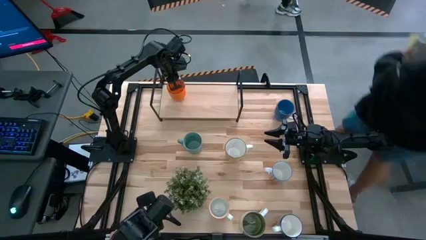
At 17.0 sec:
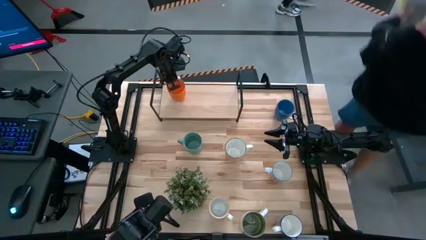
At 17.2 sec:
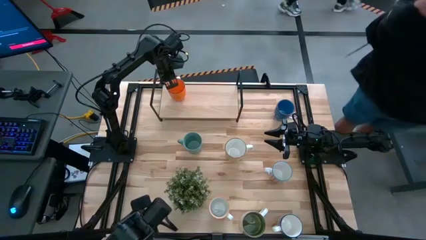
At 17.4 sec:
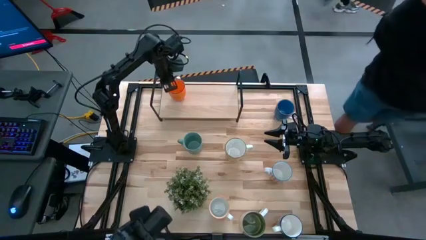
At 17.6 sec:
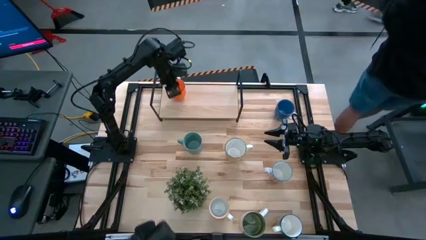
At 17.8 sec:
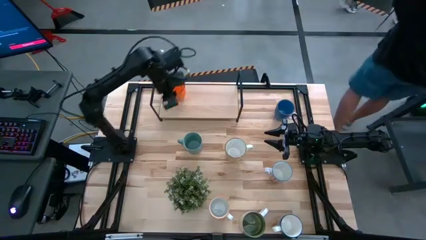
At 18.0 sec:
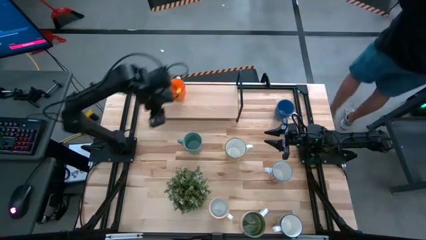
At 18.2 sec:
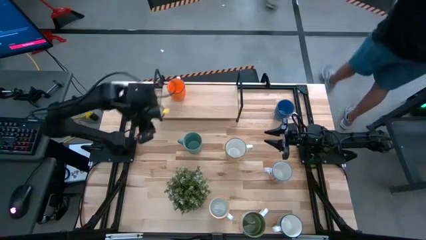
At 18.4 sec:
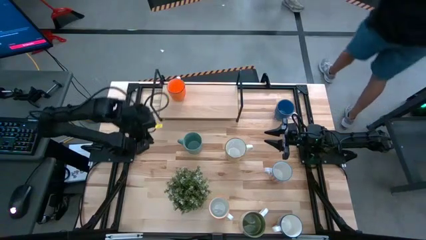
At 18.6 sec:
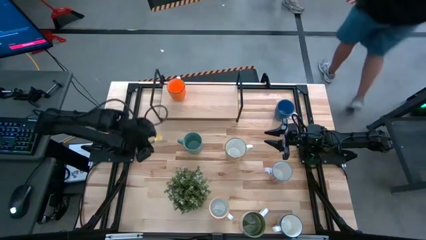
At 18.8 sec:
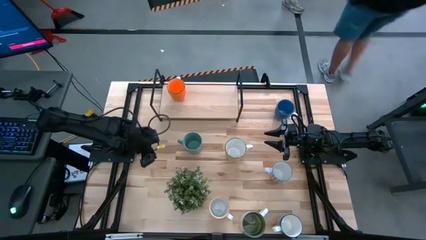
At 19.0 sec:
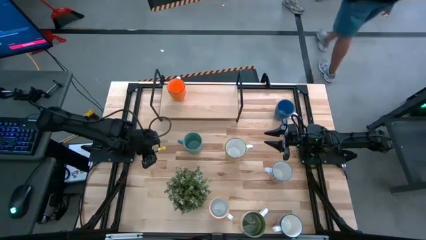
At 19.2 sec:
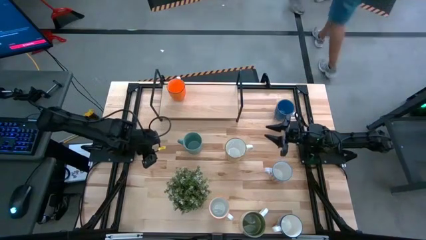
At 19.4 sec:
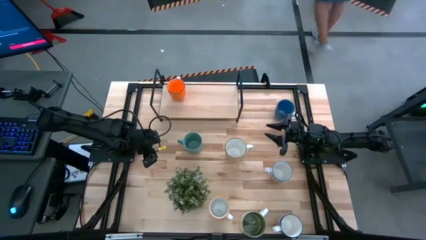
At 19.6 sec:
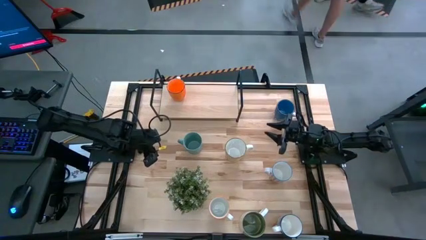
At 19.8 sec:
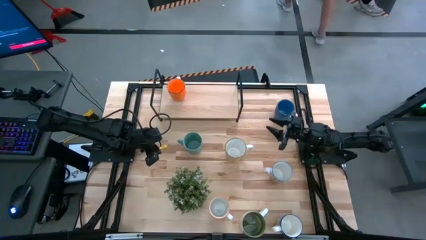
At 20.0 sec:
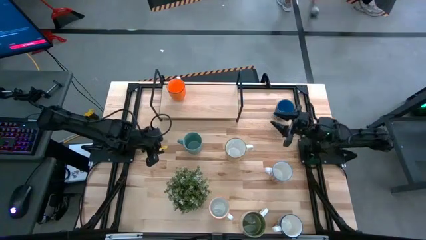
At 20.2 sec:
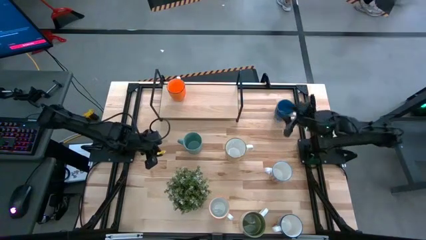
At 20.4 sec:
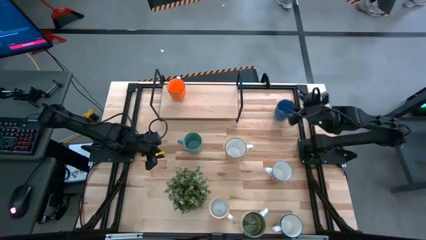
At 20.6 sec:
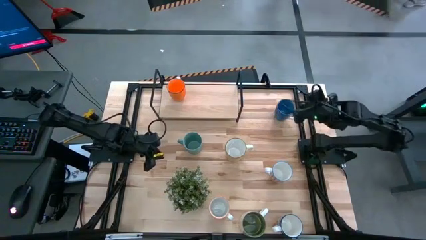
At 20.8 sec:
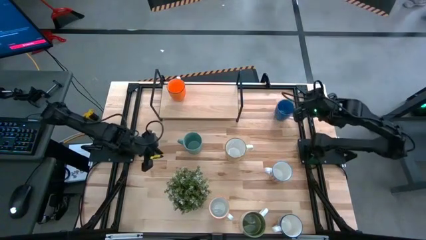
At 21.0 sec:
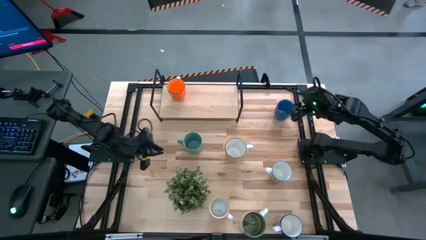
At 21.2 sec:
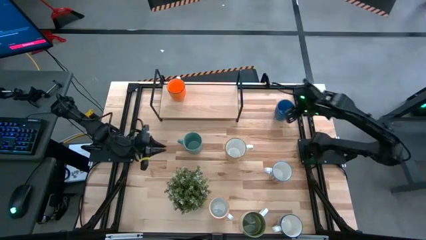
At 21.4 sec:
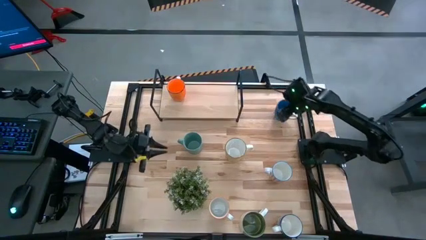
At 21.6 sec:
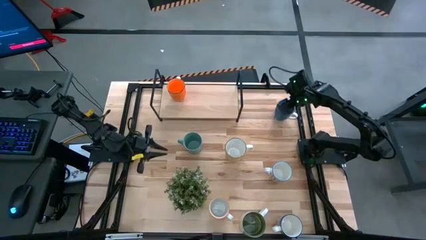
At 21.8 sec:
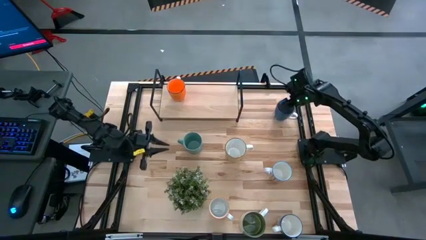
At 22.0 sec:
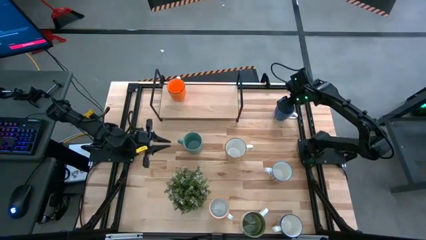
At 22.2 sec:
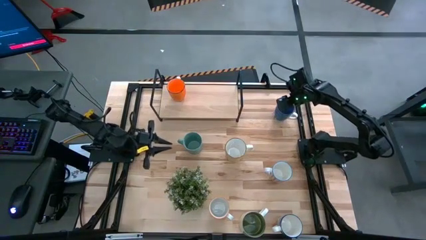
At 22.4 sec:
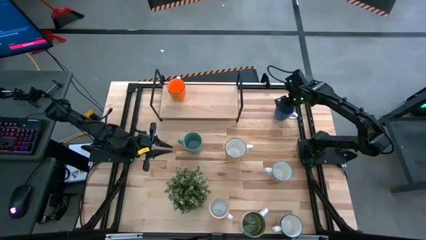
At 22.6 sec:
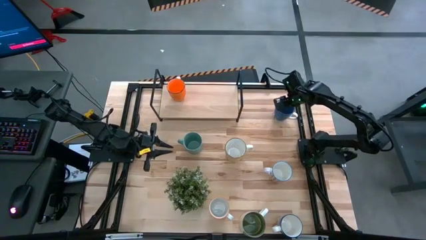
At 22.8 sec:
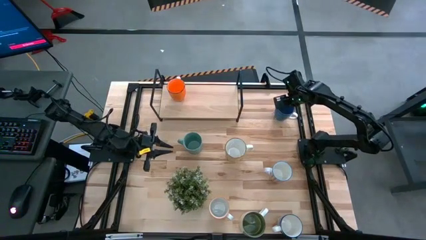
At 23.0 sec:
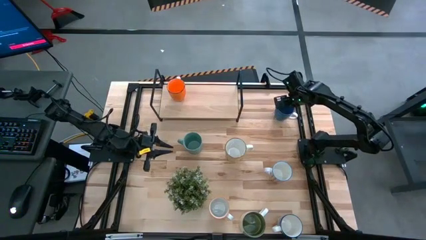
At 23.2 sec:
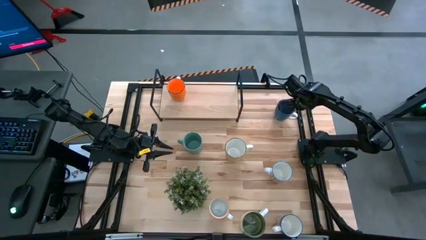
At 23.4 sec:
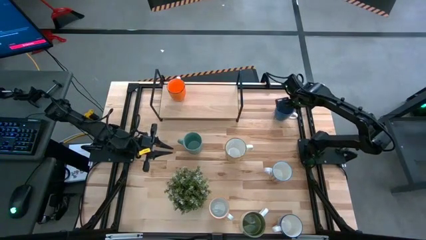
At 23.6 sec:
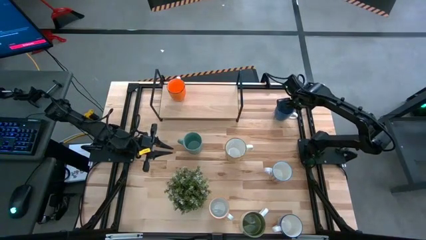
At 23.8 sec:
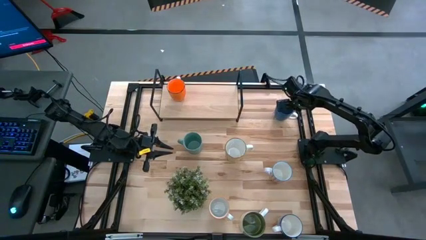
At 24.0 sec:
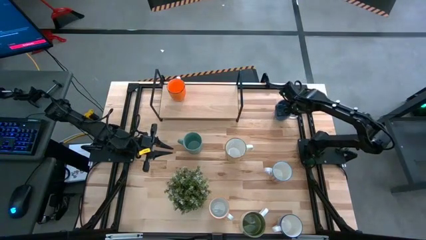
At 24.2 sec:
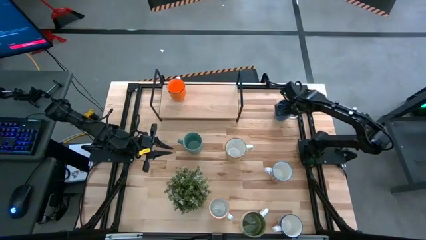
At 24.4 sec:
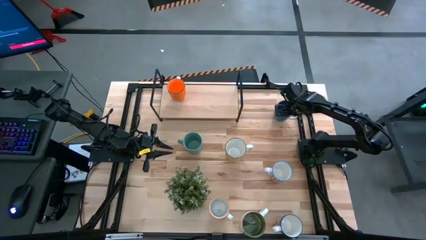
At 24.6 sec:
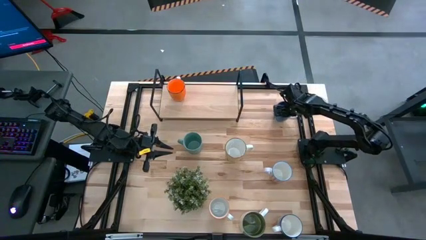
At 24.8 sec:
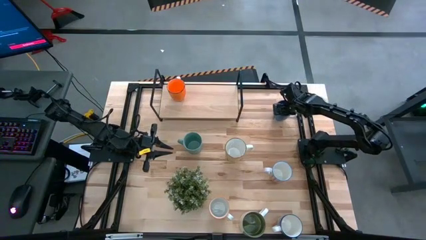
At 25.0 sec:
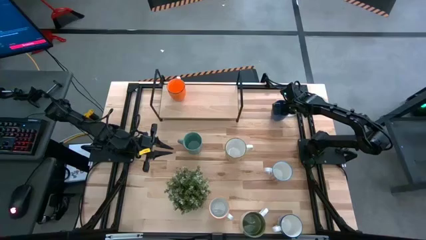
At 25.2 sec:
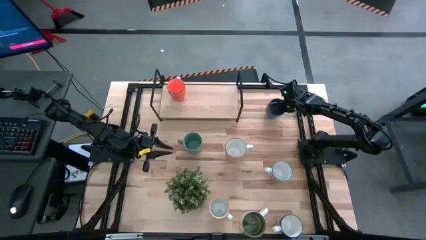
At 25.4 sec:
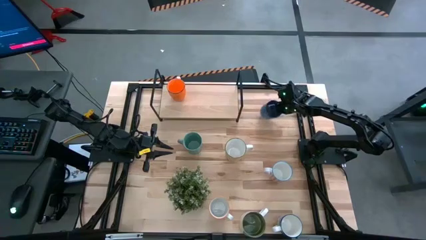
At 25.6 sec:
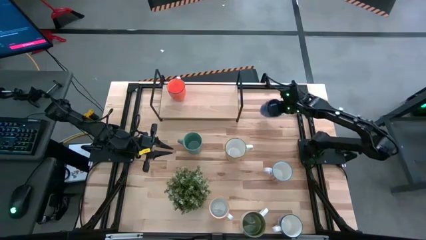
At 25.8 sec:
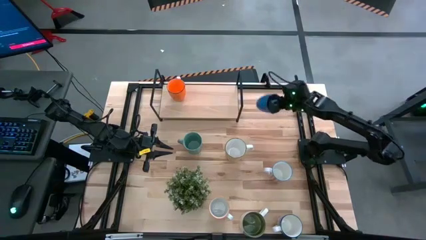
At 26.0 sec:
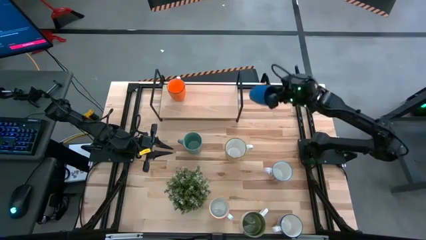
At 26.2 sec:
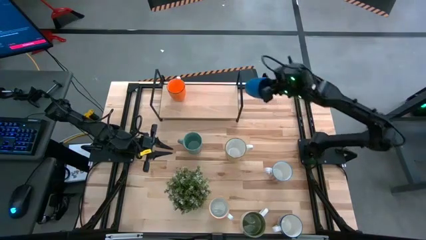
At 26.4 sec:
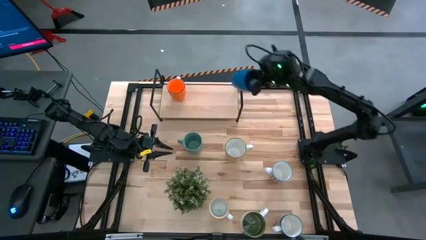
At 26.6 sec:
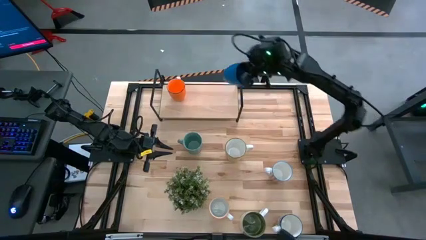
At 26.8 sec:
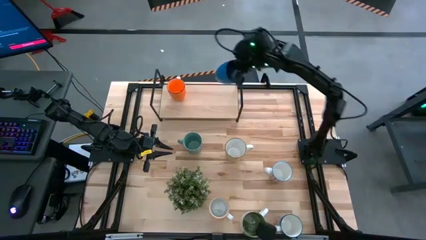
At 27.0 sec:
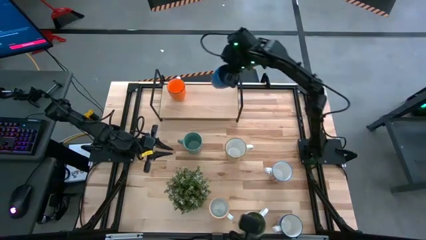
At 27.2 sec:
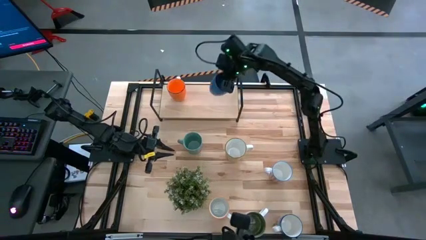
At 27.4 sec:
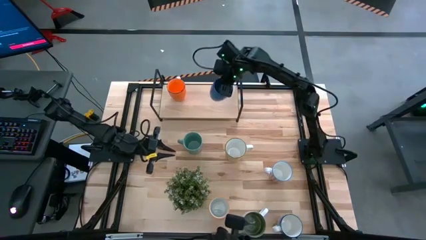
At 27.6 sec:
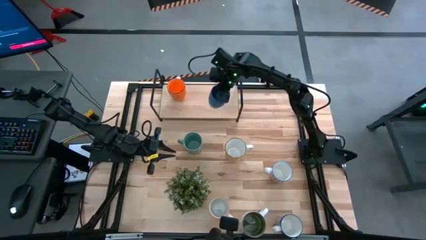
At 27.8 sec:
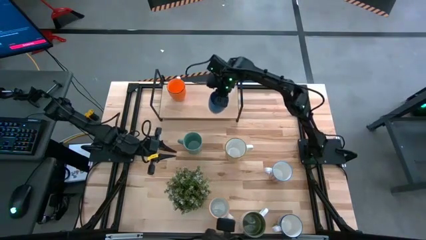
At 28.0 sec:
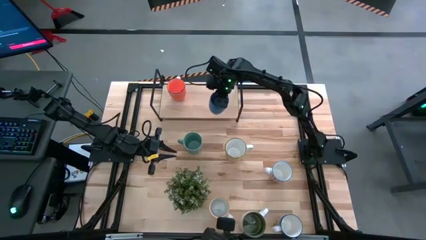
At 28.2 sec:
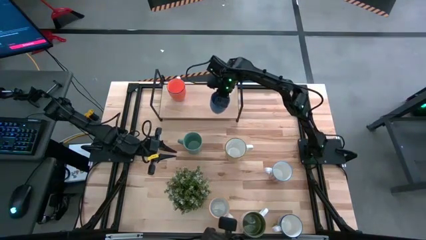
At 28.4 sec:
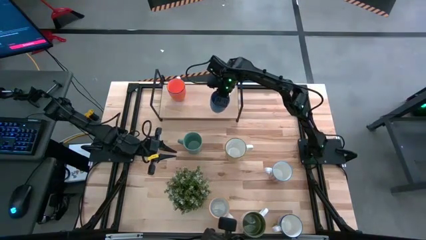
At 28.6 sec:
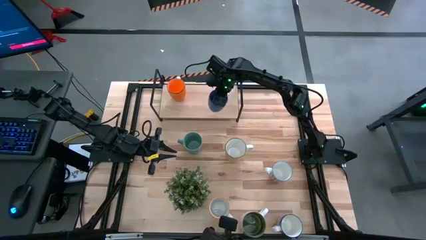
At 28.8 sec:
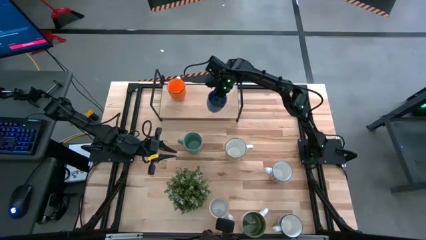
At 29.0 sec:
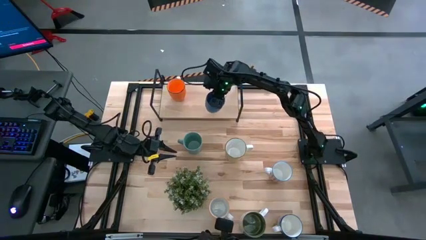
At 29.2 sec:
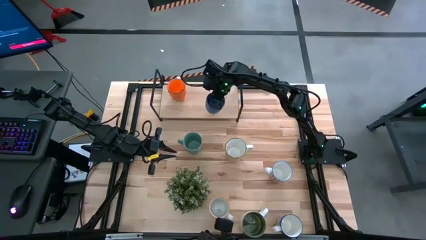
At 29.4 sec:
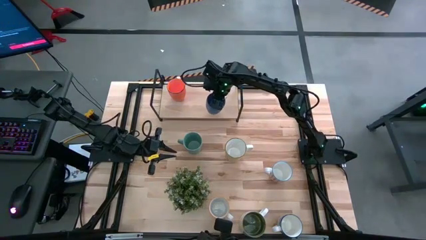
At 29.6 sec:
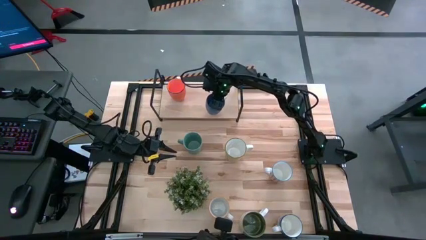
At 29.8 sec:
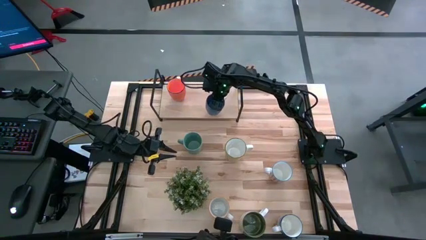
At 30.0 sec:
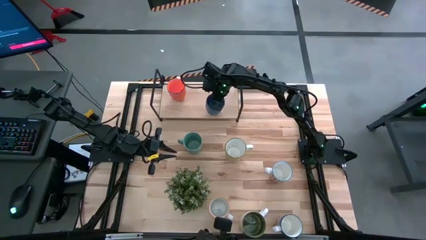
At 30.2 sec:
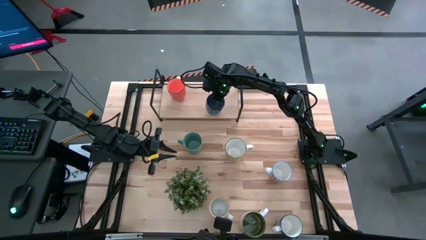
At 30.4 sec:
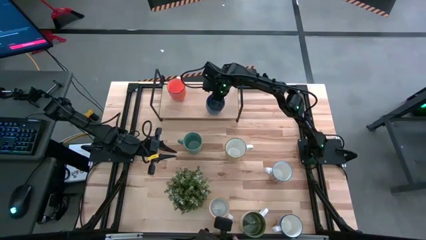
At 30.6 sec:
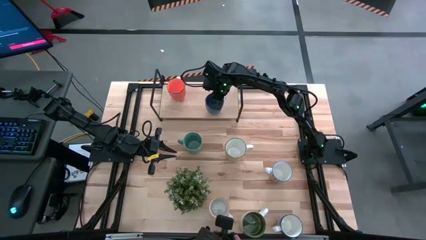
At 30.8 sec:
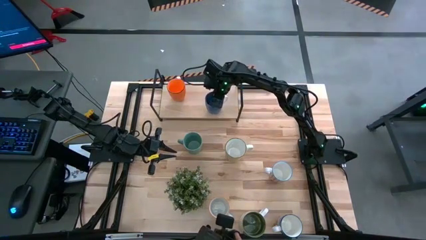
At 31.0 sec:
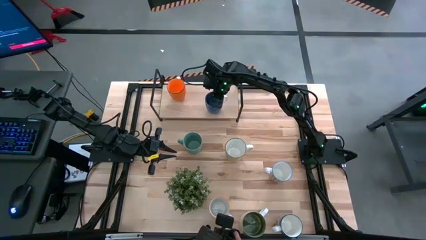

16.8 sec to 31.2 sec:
Task: Place coffee mugs
Put the blue mug on the shelf
